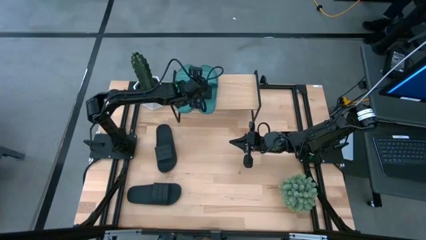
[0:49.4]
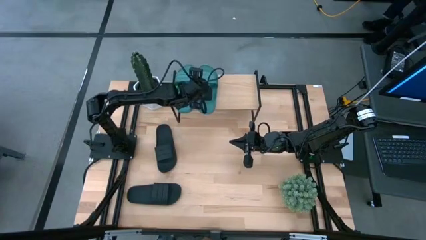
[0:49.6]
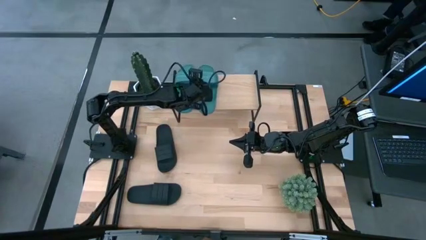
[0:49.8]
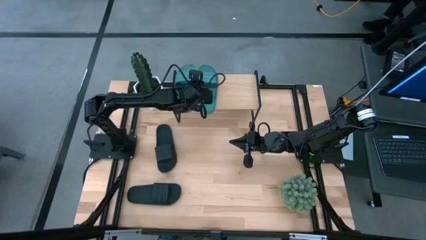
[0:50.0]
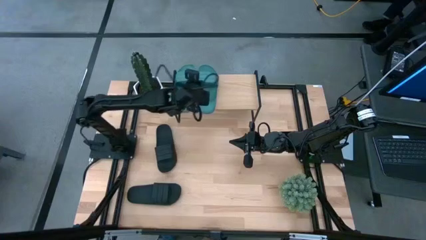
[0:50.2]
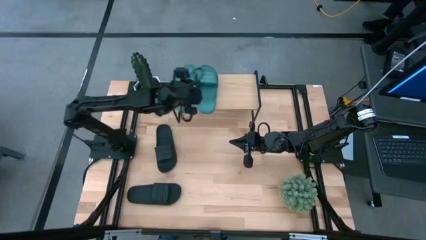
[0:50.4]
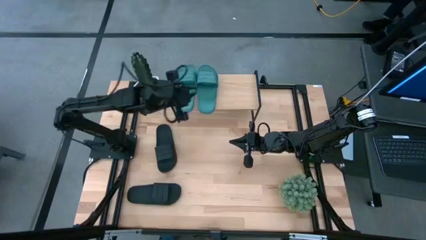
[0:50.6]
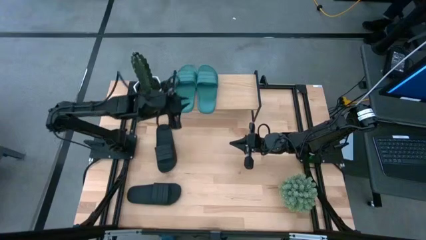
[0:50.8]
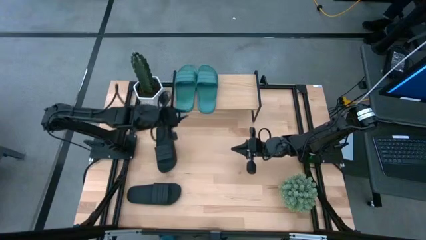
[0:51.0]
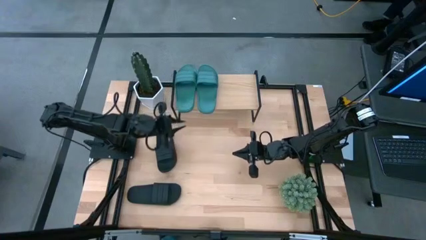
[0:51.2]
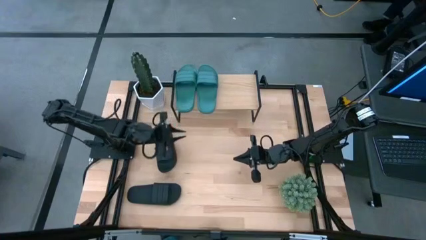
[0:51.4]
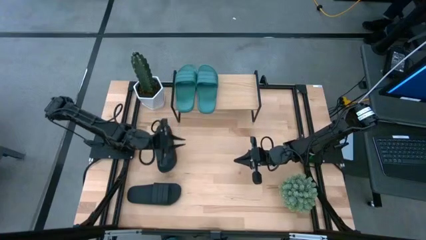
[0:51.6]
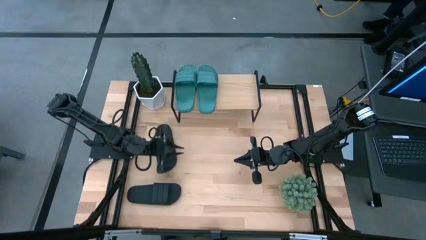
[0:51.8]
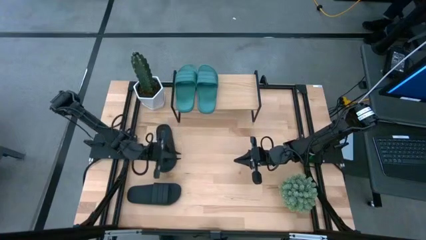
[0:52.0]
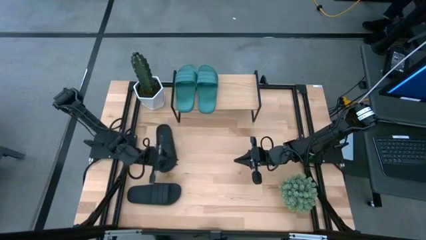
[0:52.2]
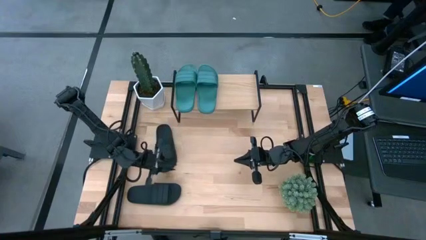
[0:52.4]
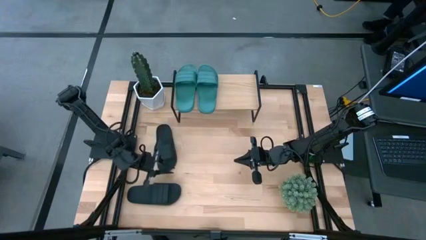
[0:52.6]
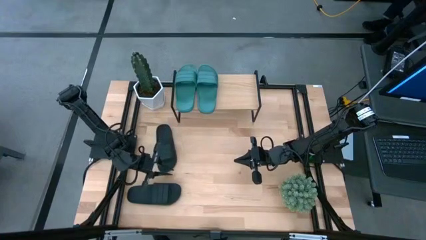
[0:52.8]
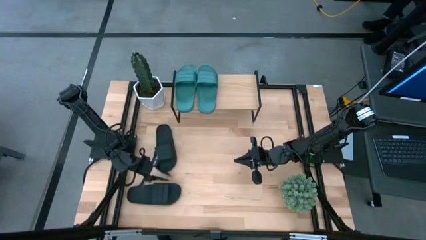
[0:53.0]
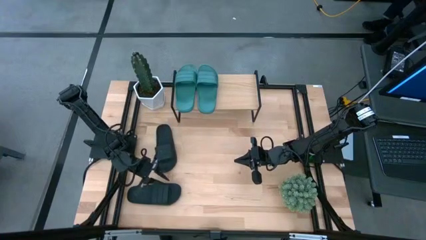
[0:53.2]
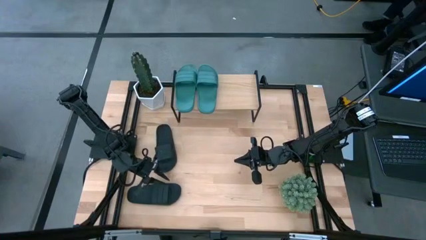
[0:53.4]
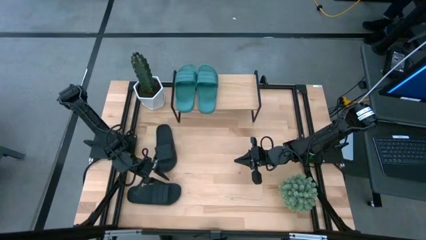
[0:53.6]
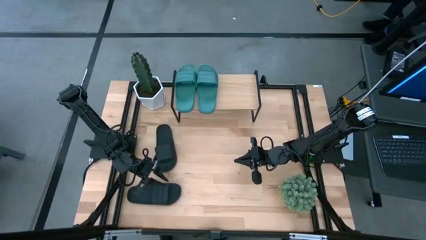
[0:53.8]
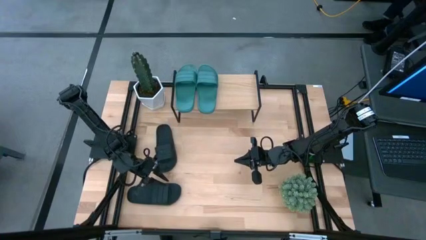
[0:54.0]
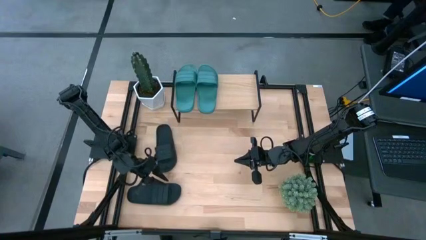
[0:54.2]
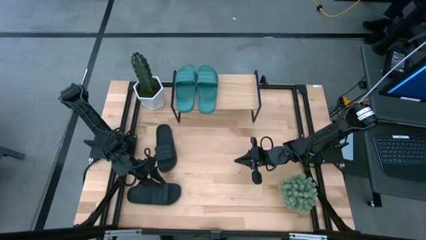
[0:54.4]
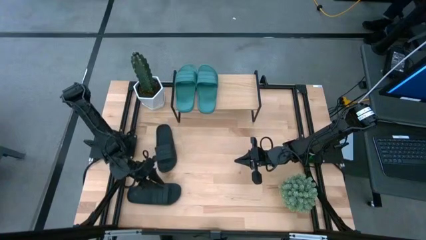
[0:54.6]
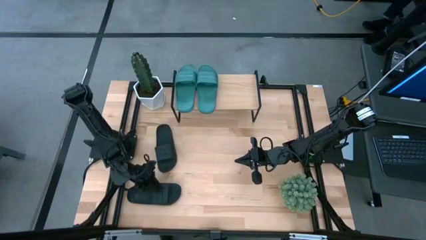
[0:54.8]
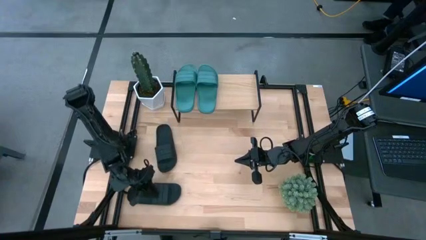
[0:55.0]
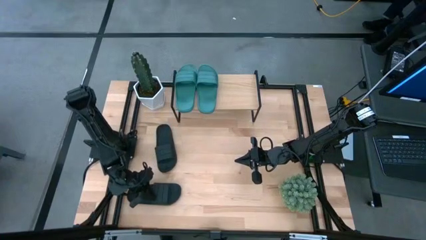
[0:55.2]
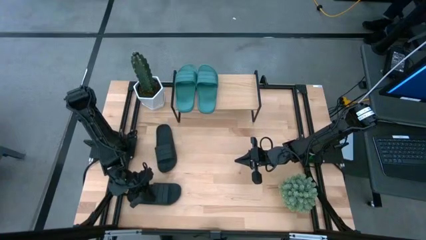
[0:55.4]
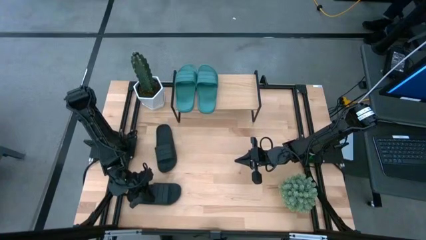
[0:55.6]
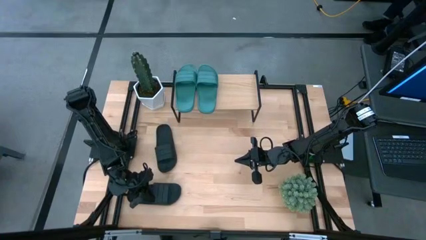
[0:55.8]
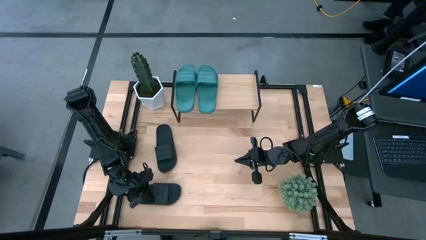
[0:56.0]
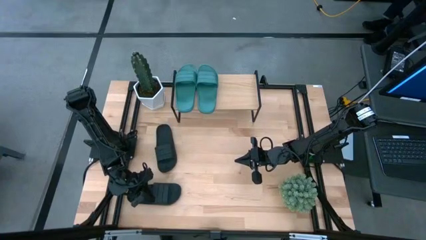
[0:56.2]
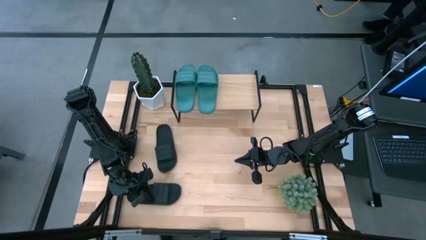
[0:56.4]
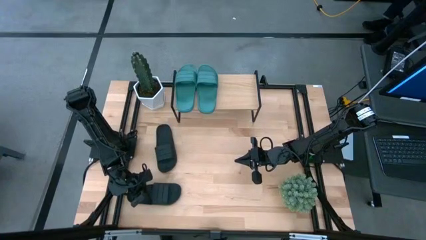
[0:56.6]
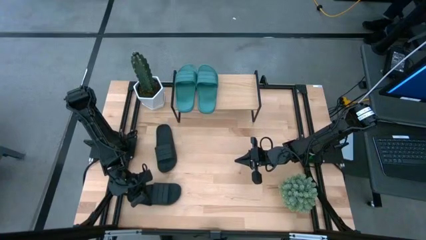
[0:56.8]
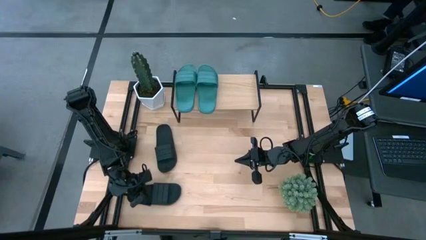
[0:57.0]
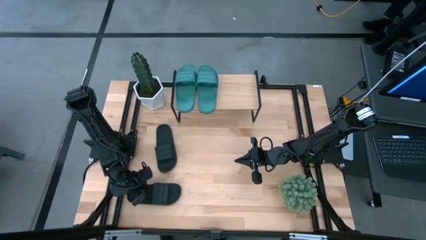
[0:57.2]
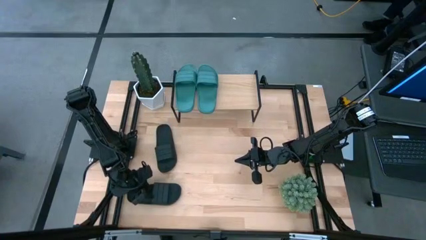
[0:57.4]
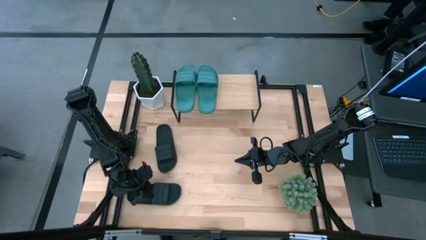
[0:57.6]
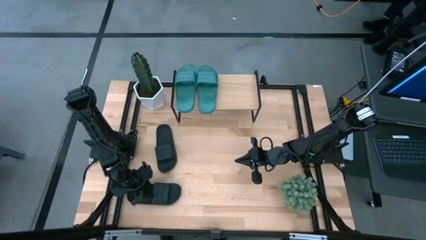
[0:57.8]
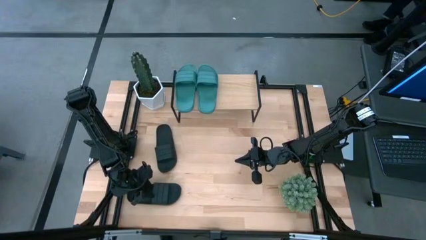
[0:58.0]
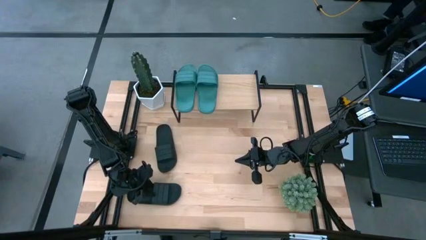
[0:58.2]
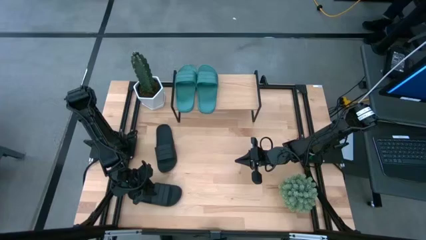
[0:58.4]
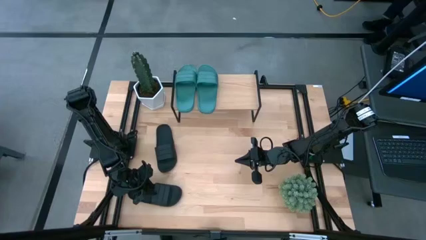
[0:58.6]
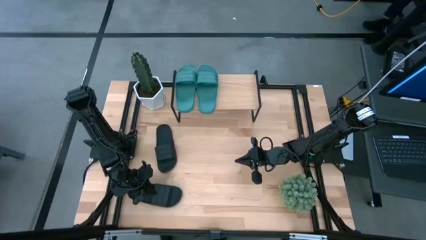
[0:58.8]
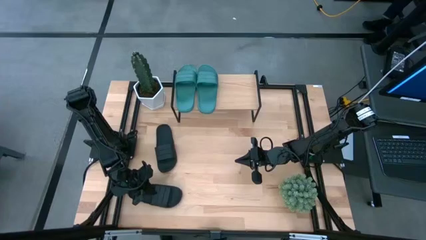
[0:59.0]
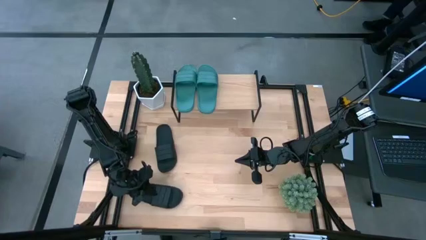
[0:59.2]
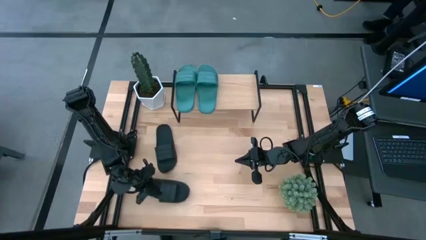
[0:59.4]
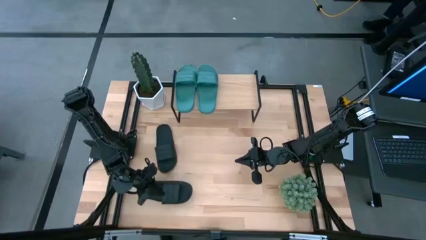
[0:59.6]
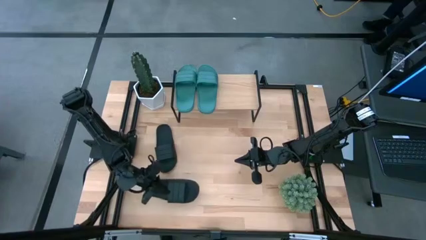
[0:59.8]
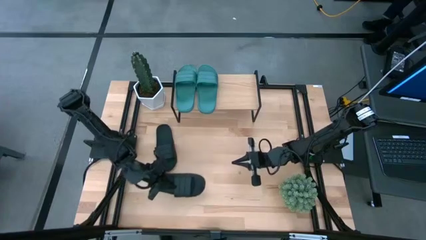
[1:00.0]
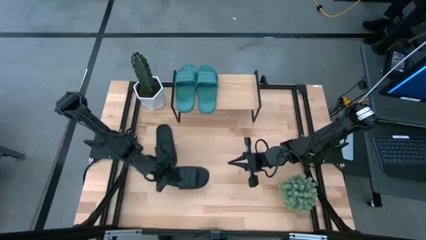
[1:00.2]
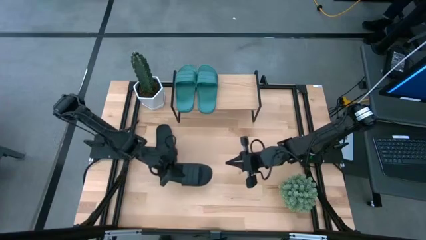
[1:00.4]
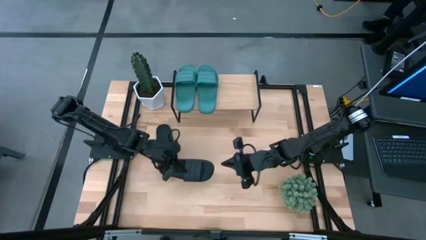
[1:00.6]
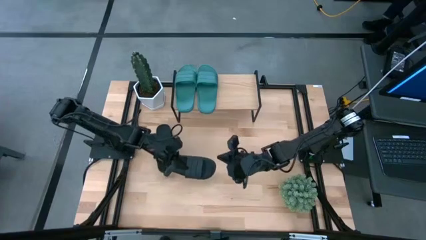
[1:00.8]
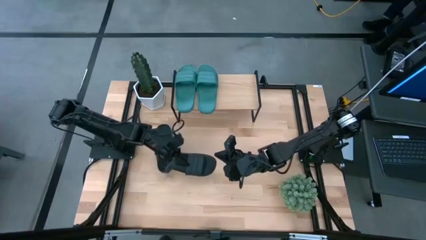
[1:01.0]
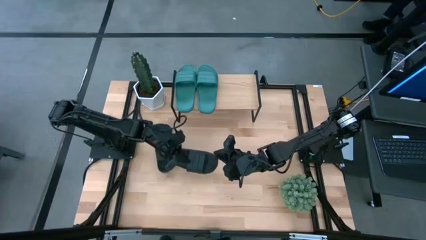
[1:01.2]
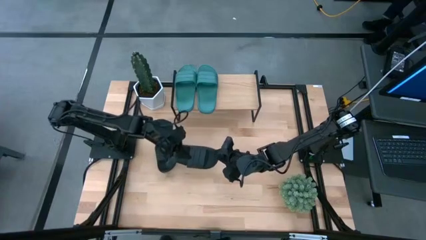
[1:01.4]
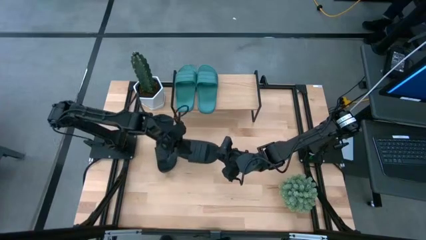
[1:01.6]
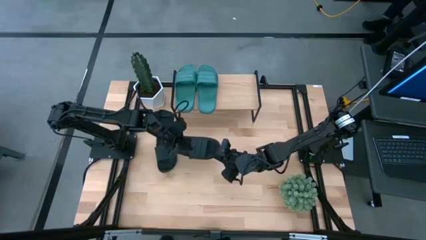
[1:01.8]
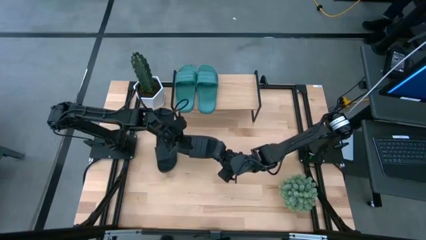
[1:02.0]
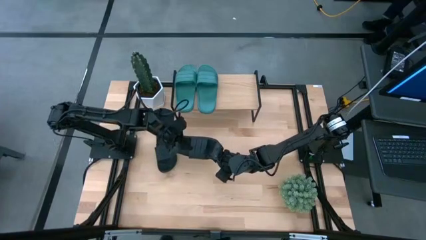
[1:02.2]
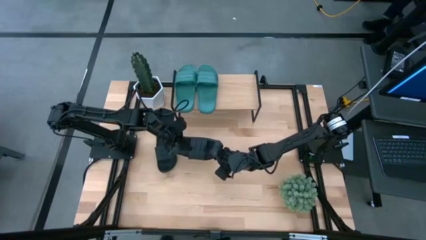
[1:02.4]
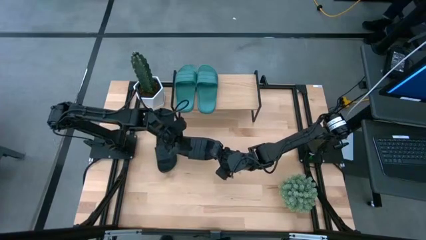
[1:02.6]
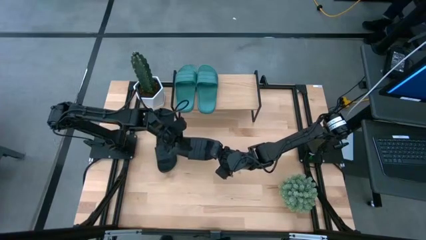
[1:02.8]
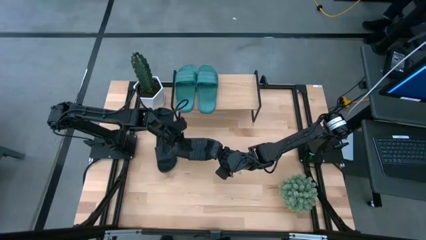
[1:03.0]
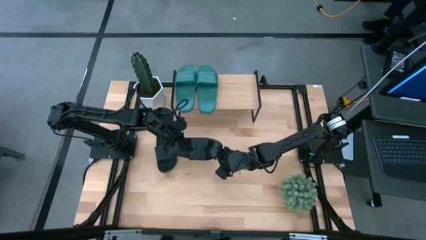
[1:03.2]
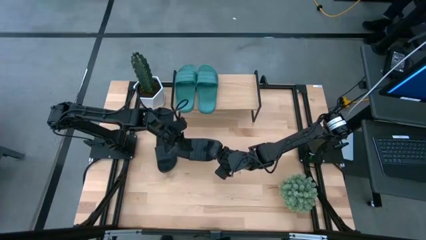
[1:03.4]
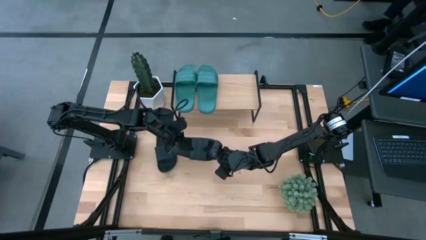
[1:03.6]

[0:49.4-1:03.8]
Task: Pick and place slides into the shelf
Put the black slipper on the shelf

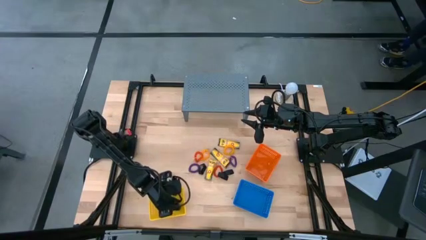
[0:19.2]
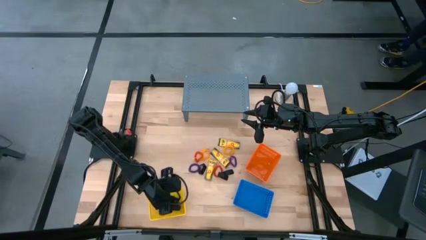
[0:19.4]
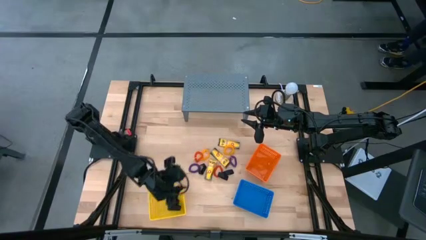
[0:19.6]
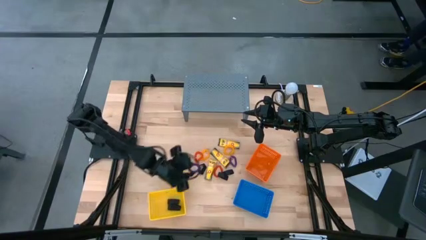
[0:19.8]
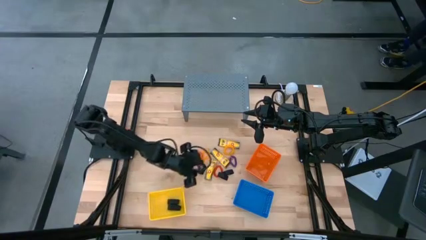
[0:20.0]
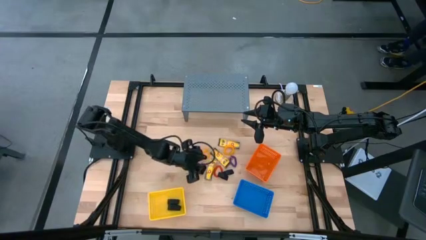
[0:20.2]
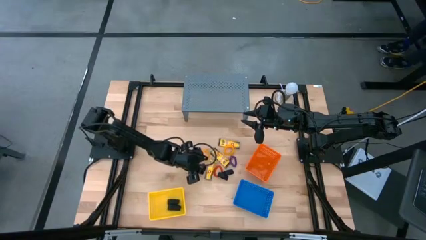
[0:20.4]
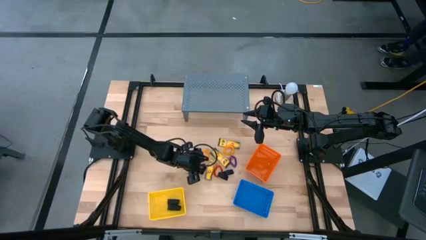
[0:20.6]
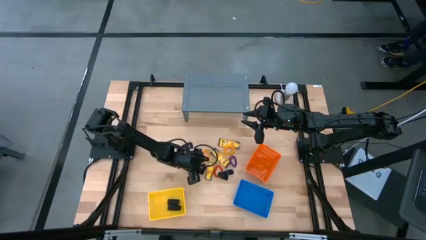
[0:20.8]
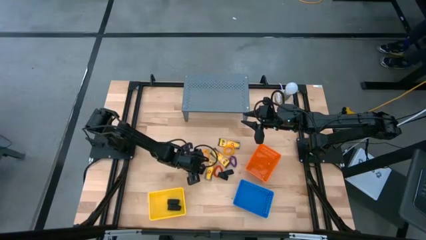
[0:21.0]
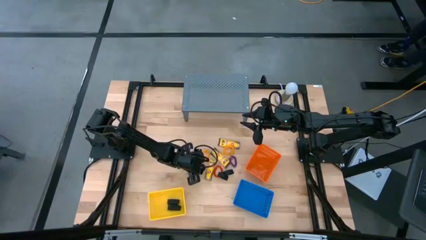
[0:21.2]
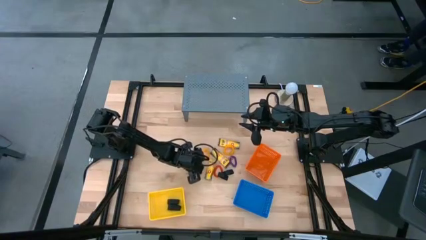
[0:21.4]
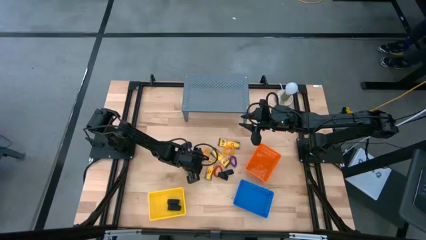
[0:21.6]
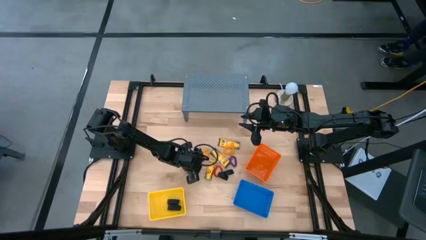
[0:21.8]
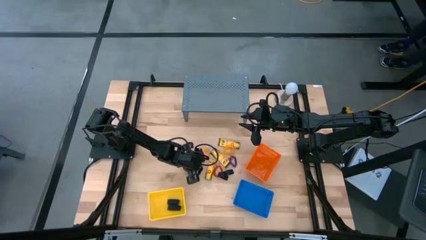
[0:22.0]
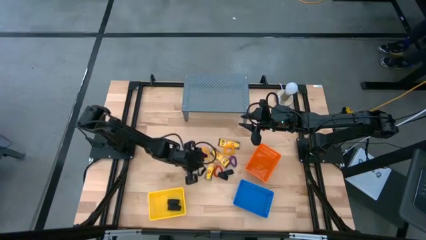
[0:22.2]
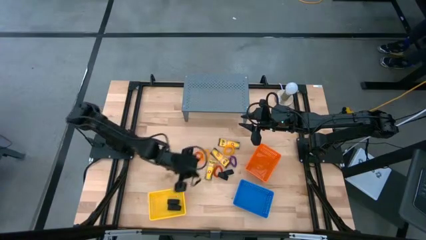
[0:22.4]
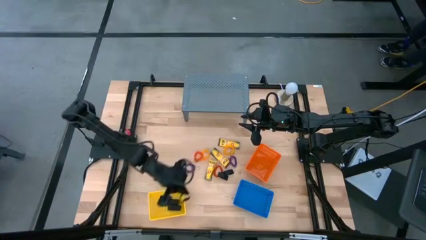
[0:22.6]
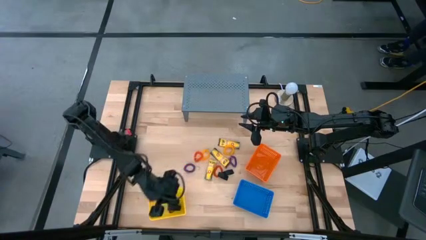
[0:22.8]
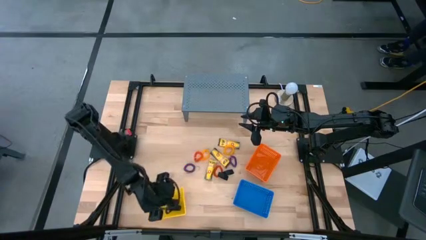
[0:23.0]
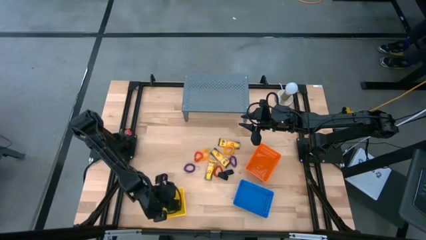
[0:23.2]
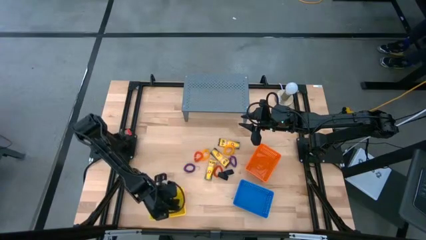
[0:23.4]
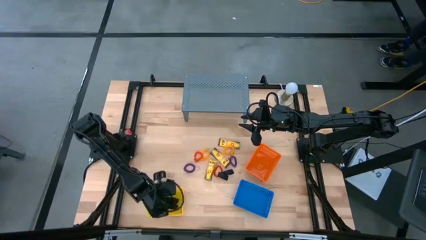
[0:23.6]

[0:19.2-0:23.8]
Task: Pick & Place Office Desk Supplies
Put the black rubber band into the yellow basket
